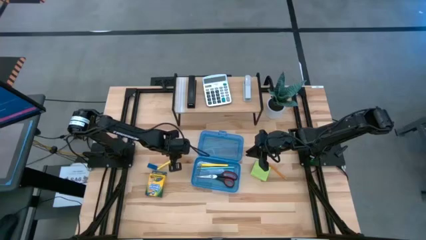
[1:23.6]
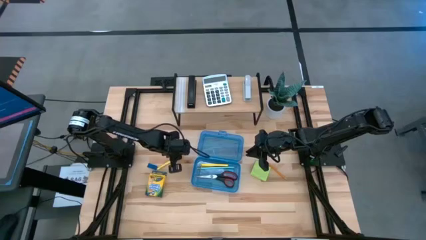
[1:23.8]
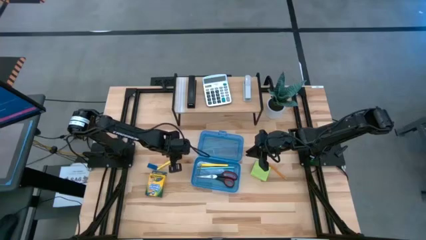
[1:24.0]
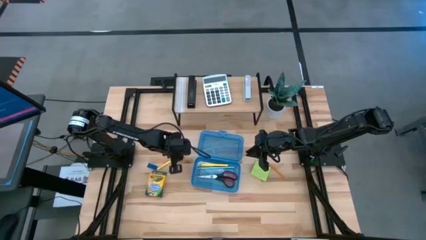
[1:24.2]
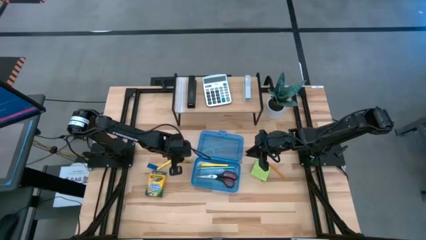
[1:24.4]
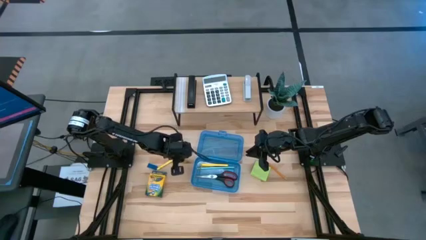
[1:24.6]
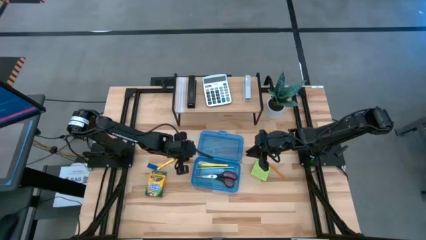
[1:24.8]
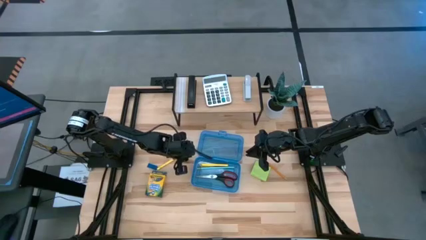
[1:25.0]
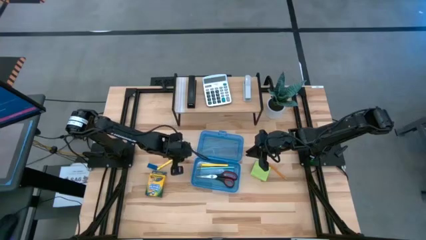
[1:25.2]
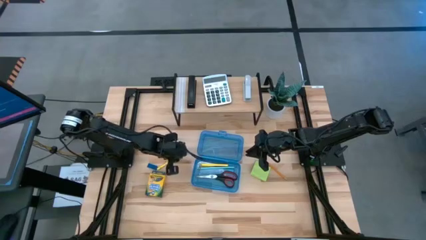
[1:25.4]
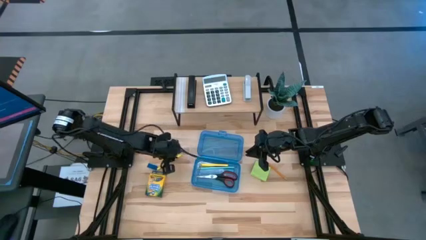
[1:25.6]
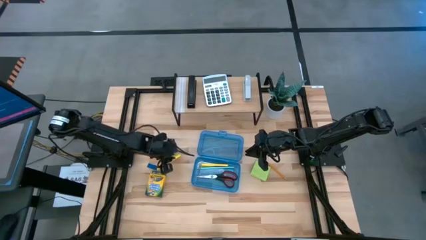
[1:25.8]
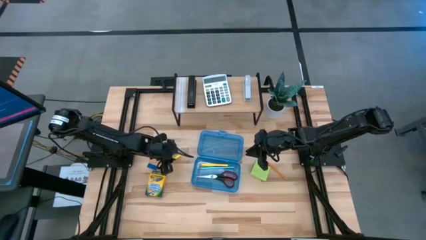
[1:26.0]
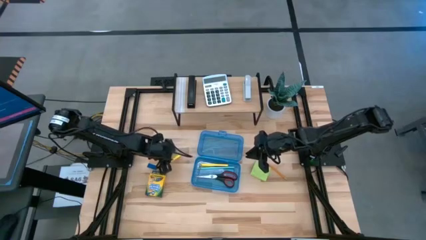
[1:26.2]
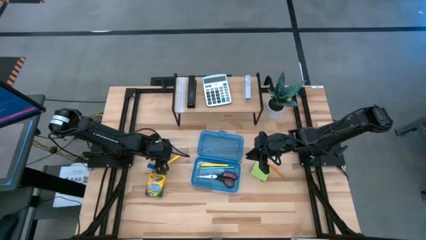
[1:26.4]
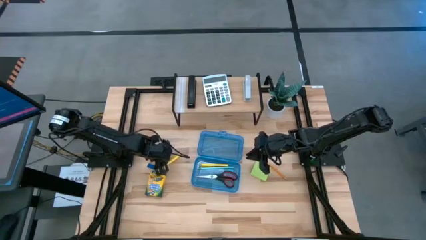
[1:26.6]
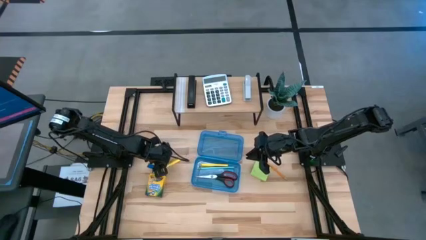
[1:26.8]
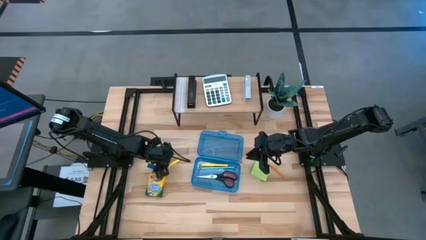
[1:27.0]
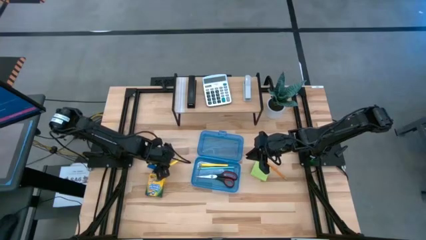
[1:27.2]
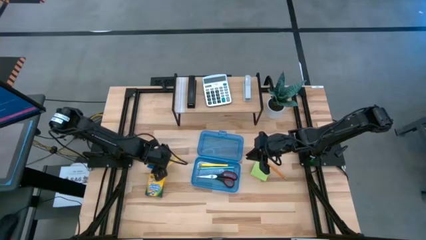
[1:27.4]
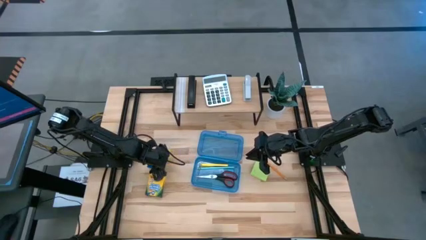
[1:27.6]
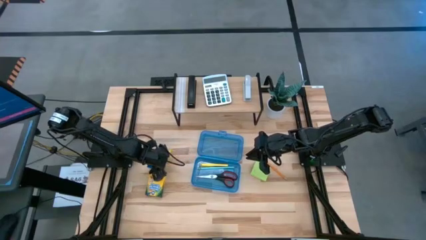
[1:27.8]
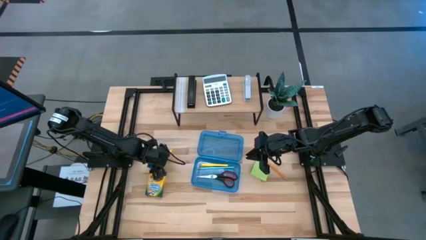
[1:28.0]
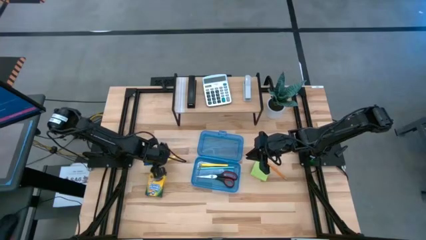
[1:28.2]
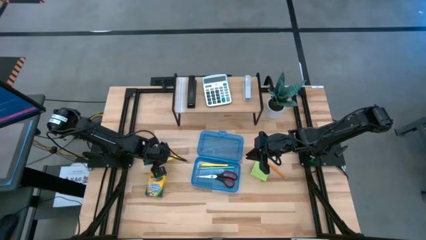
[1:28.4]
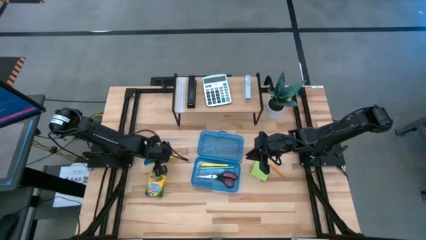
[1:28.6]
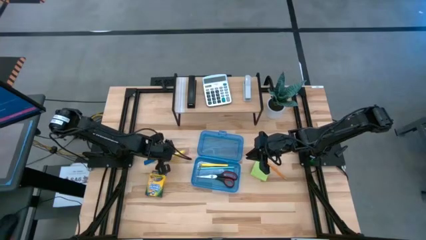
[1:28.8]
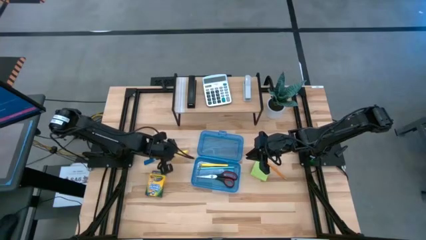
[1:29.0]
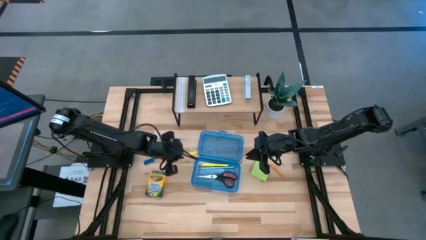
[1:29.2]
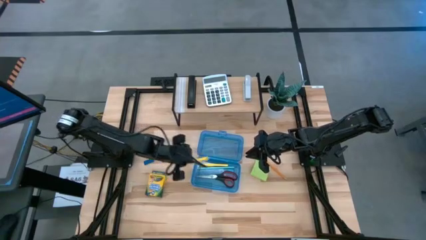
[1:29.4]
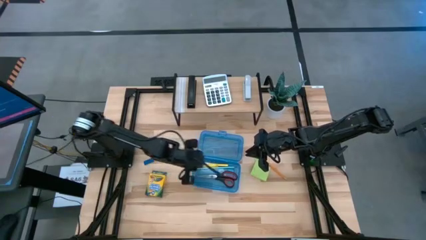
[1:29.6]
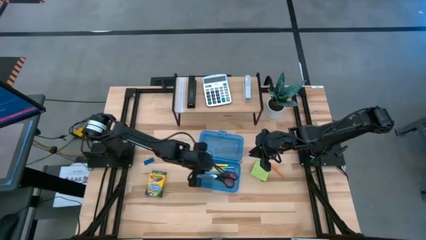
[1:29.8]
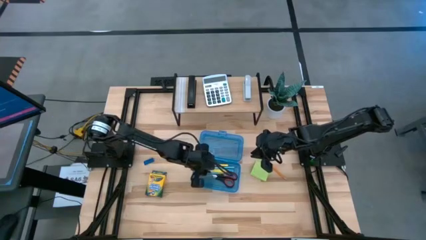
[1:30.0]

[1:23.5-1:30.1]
Task: Pack school essentials
Put the yellow pen into the blue supply box

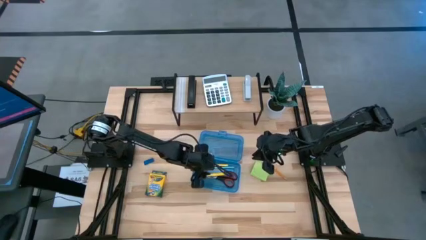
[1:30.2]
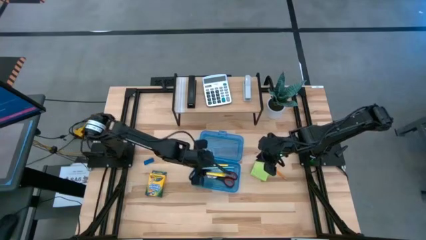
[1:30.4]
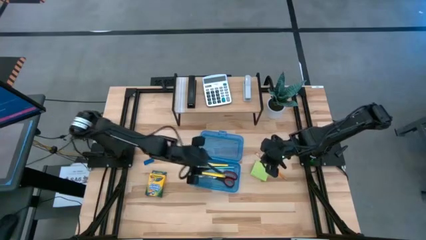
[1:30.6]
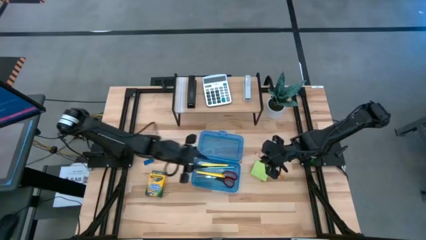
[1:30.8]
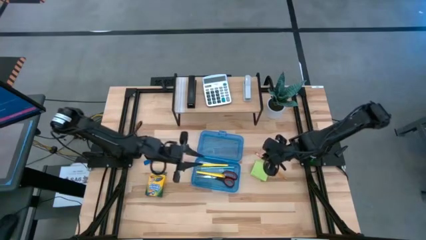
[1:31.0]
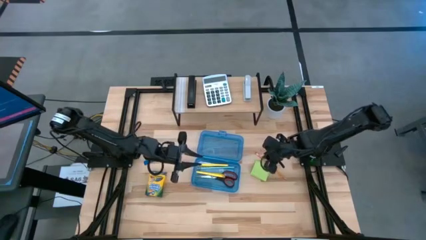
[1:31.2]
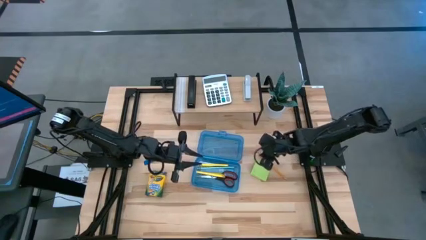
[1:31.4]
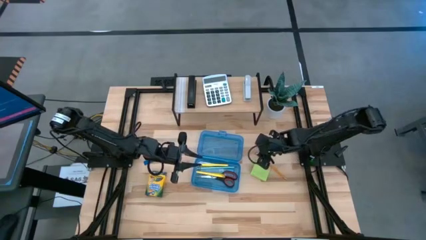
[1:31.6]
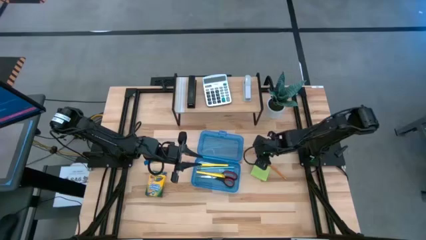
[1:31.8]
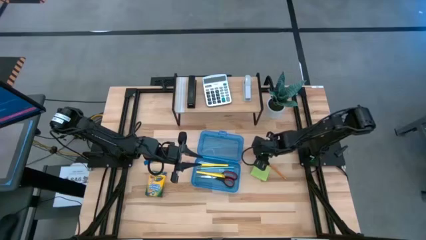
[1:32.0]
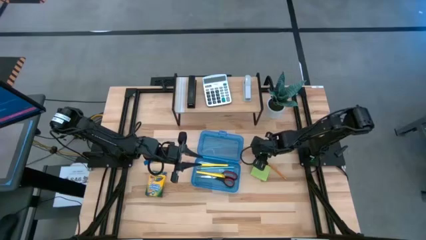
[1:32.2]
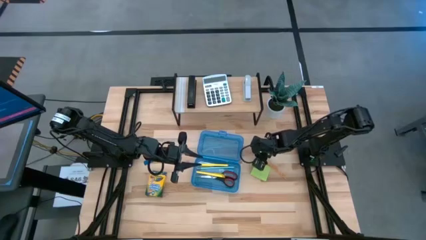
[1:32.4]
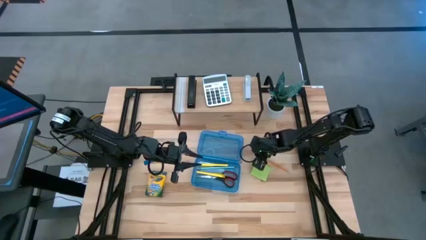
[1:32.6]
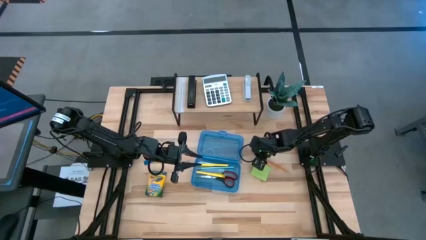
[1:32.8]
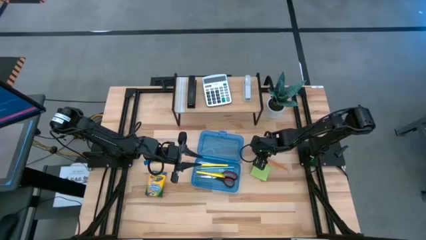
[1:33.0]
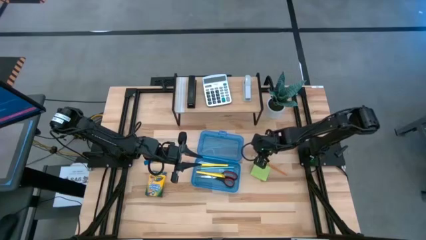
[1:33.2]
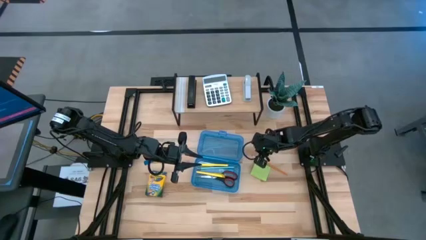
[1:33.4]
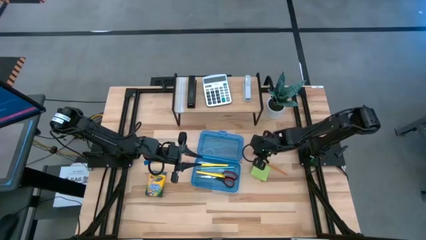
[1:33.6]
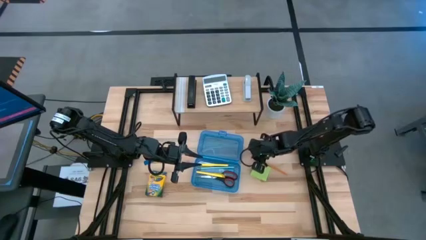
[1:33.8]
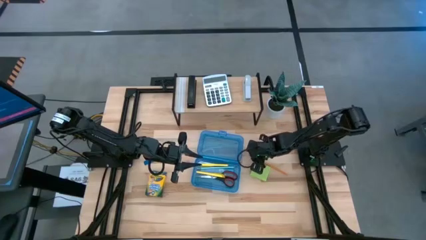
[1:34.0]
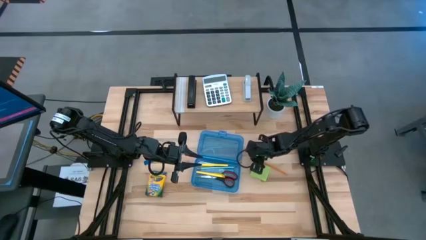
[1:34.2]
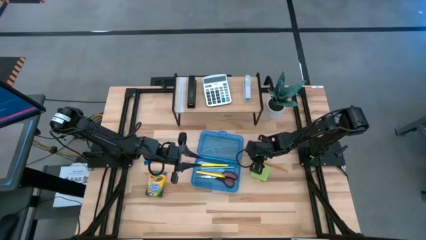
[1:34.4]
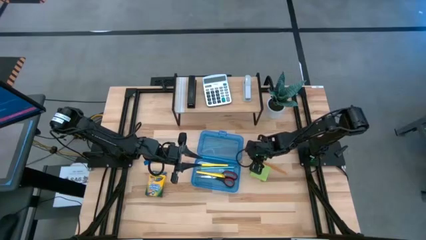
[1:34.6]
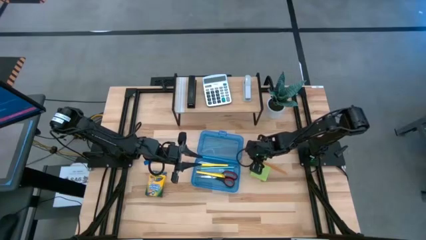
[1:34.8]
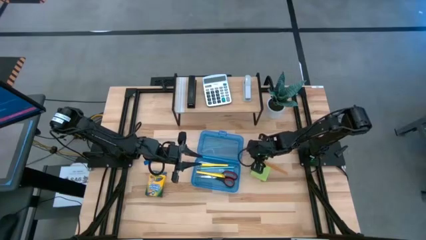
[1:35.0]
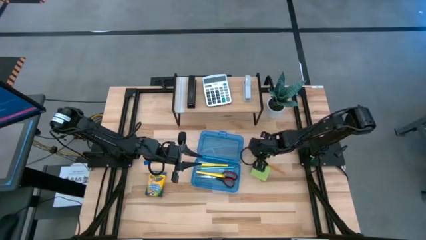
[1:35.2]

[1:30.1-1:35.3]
Put the yellow pencil into the blue supply box

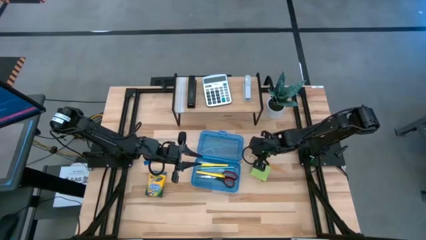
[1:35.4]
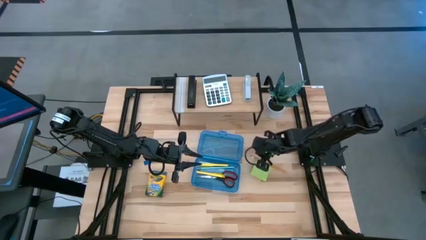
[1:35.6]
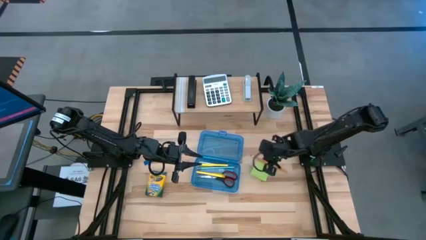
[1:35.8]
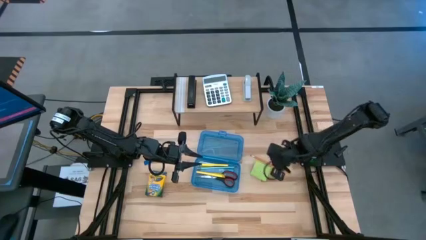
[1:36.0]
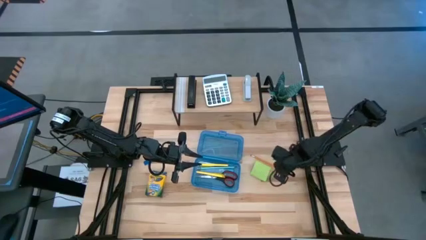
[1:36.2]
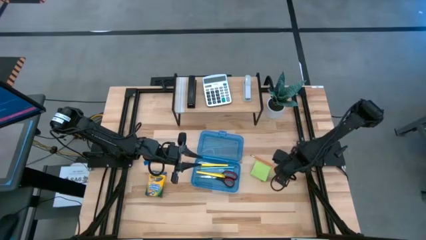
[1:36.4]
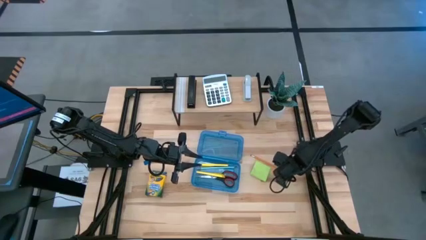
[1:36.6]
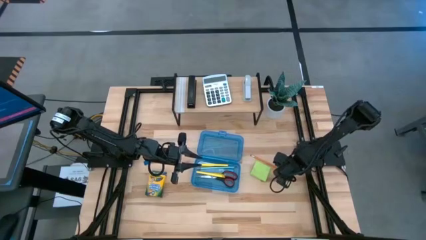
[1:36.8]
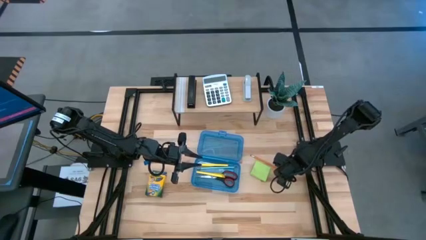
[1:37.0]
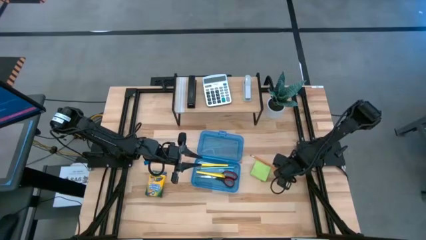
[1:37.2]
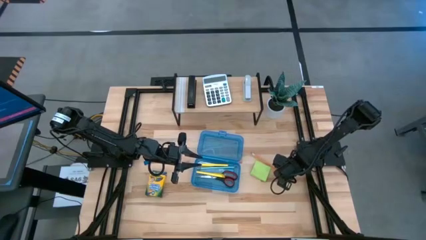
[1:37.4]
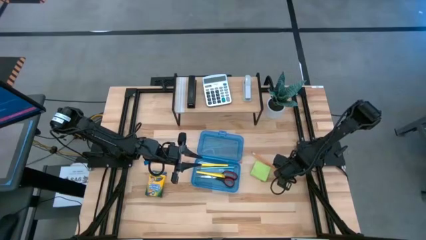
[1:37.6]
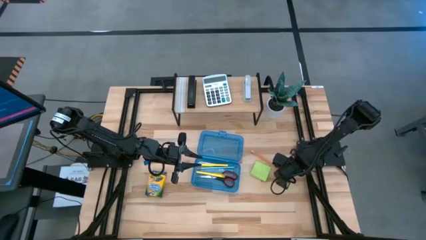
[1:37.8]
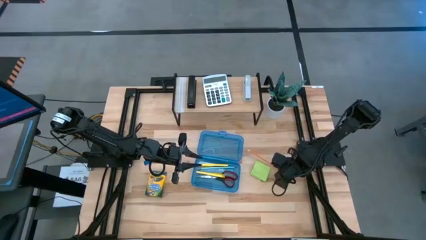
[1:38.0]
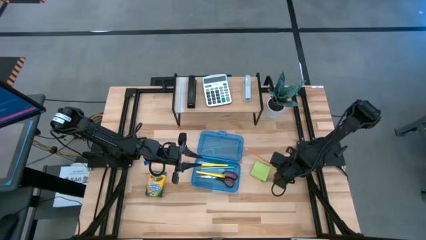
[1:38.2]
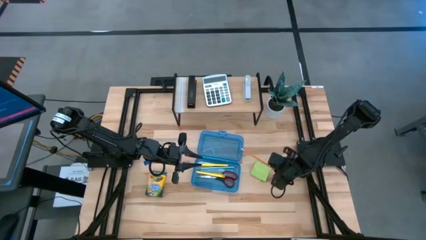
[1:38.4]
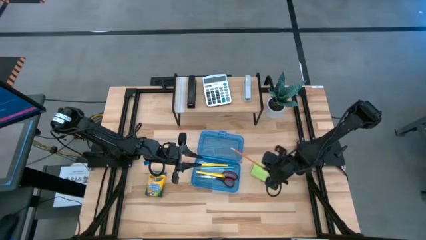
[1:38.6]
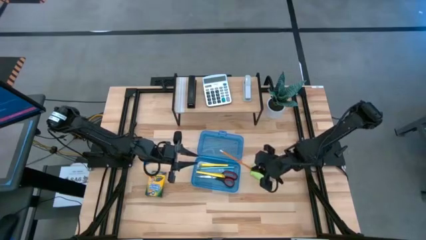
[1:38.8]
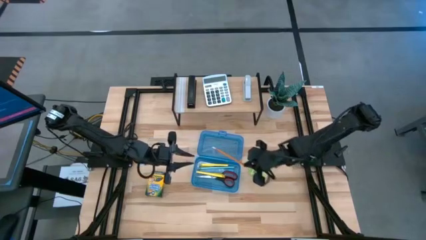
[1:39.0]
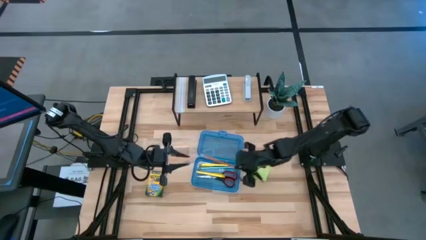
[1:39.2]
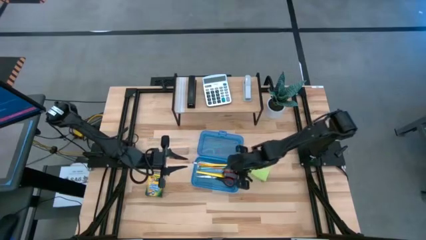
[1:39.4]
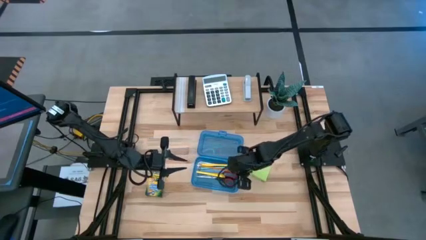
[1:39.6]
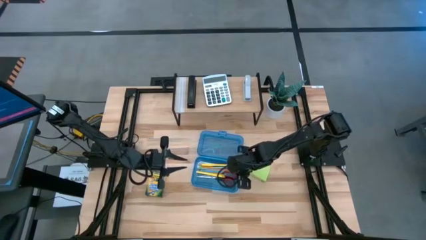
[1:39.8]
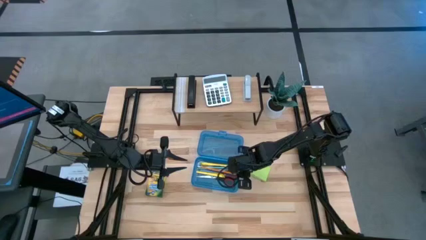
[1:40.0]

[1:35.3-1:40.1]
Put the yellow pencil into the blue supply box
